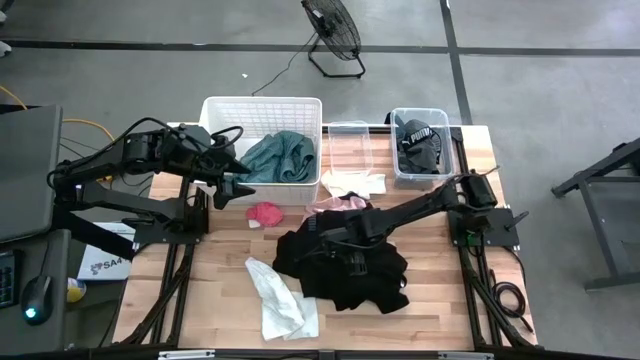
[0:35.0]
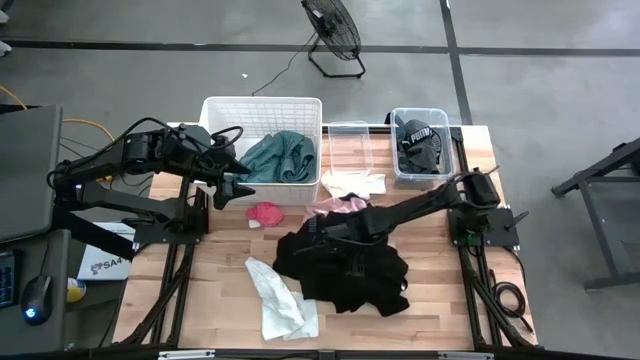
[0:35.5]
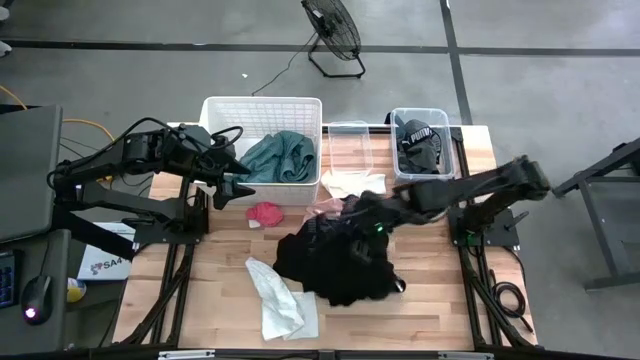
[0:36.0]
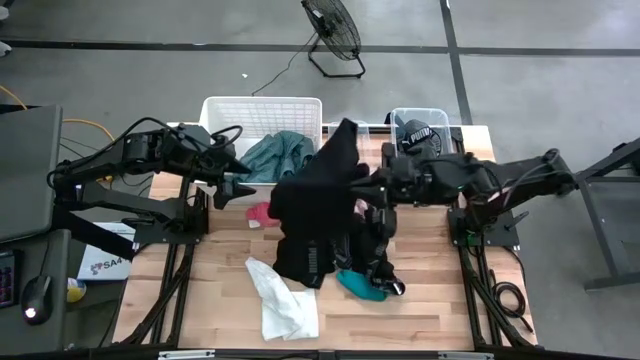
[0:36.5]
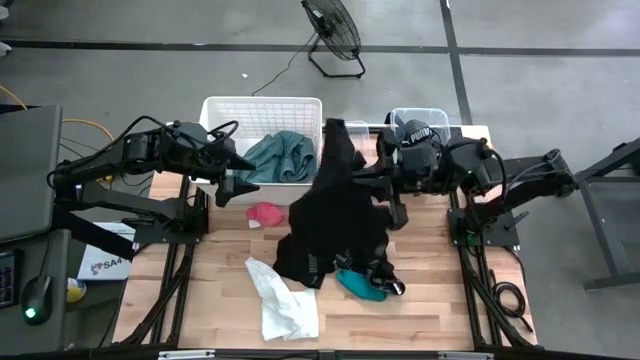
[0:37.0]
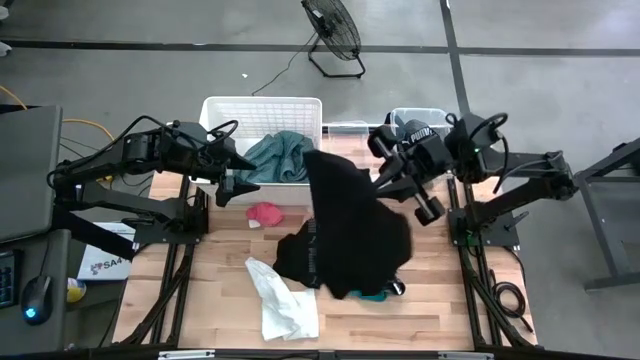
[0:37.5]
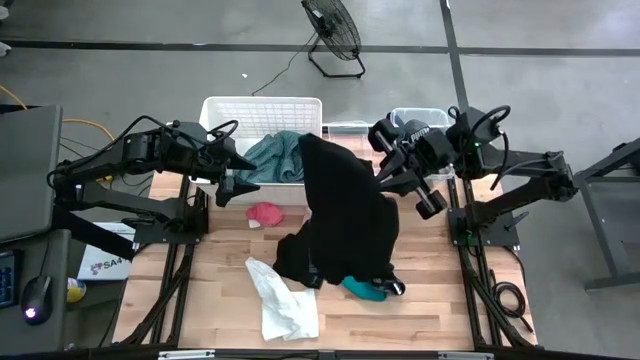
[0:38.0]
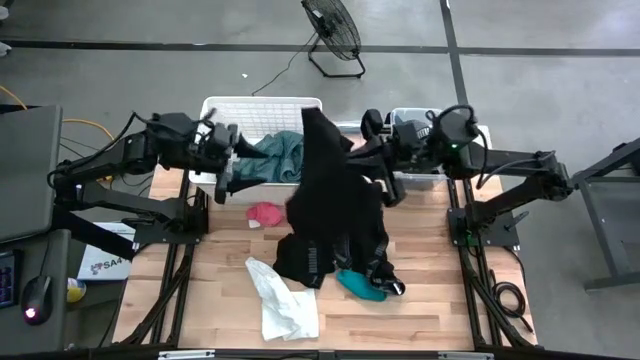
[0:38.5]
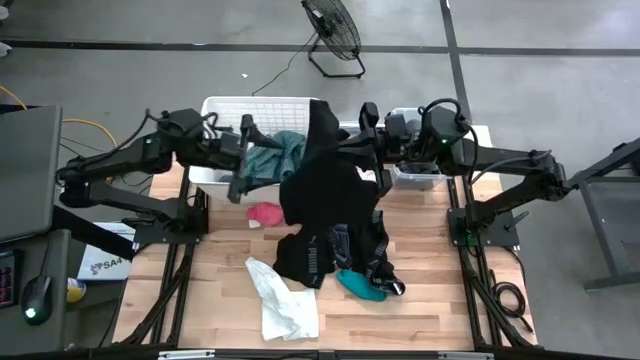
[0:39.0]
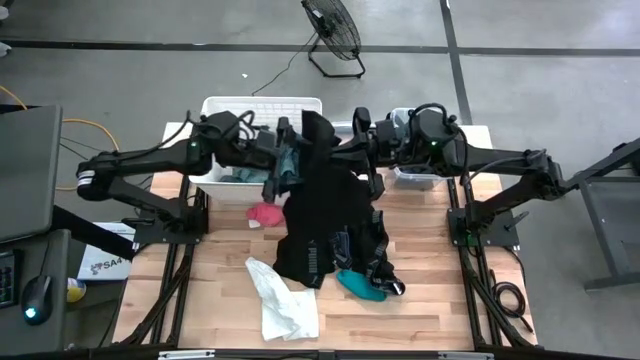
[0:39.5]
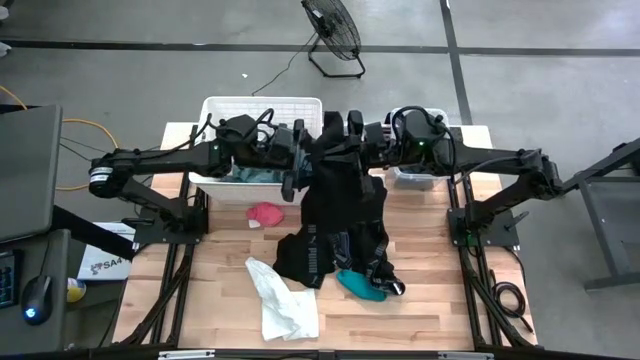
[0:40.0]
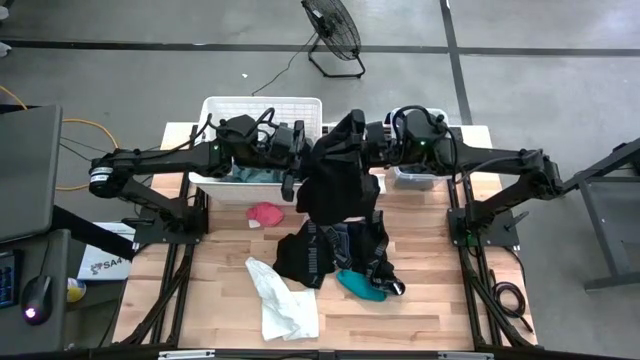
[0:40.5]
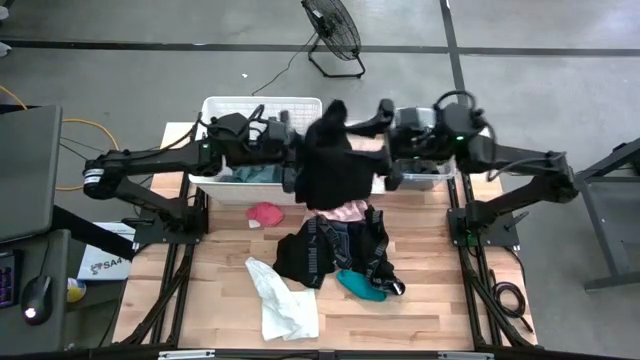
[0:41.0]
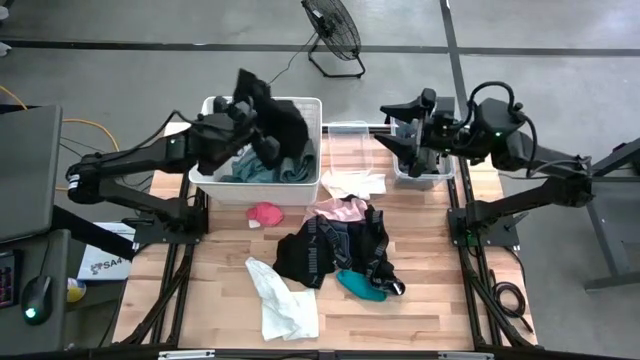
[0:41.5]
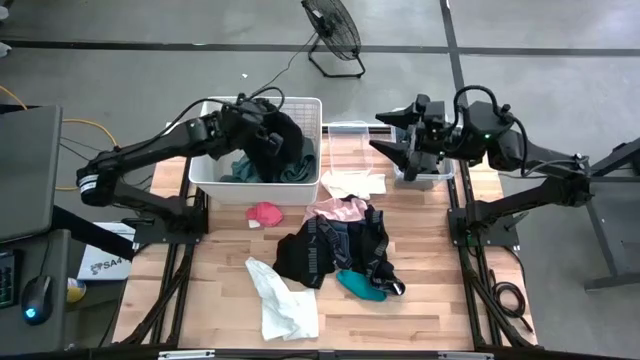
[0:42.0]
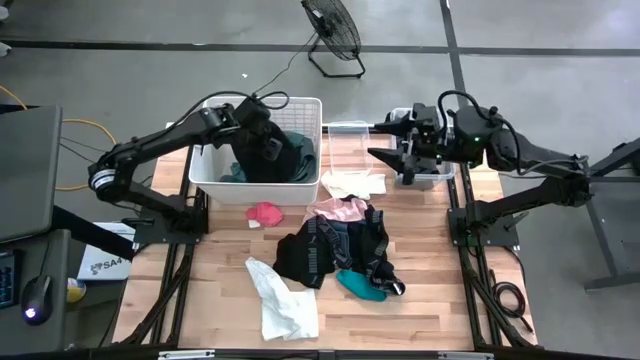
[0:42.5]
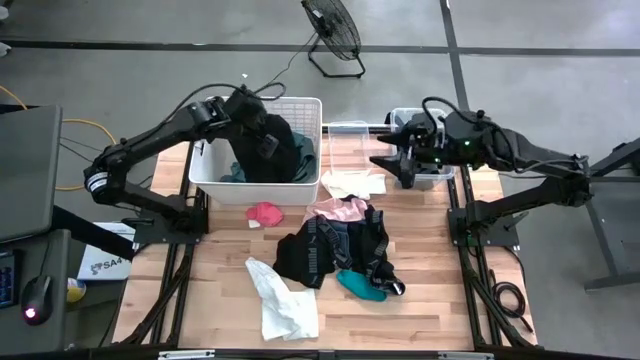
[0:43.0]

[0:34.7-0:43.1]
Task: Pick & Place Cloths
Put the black shirt into the white bin

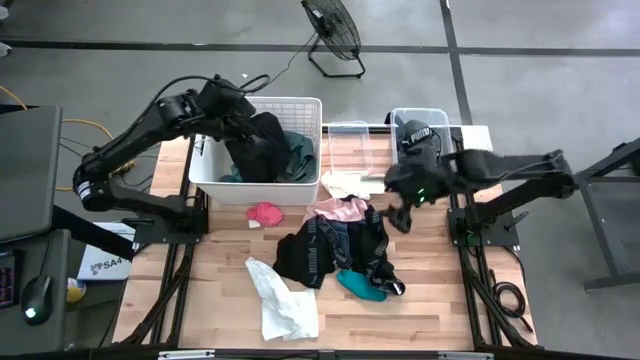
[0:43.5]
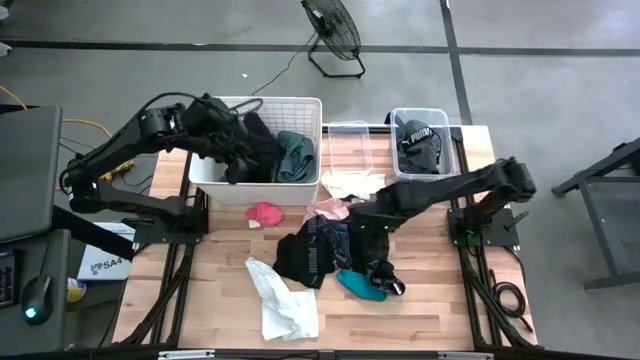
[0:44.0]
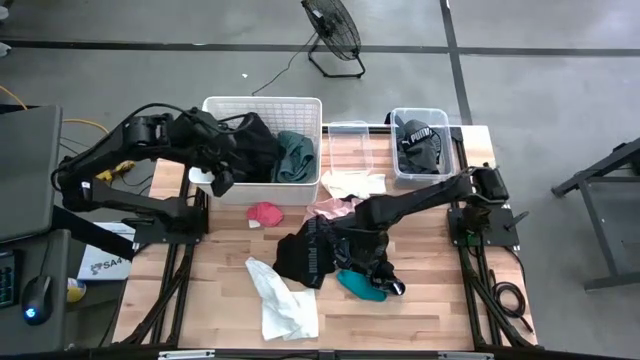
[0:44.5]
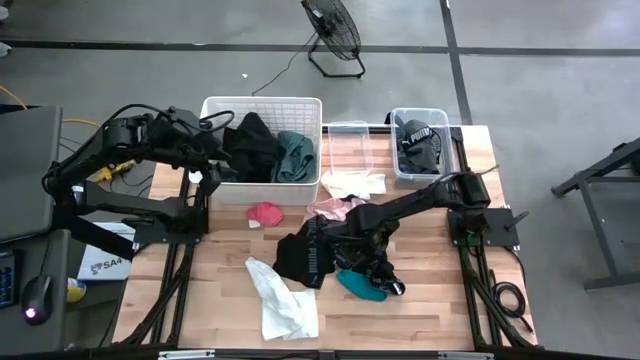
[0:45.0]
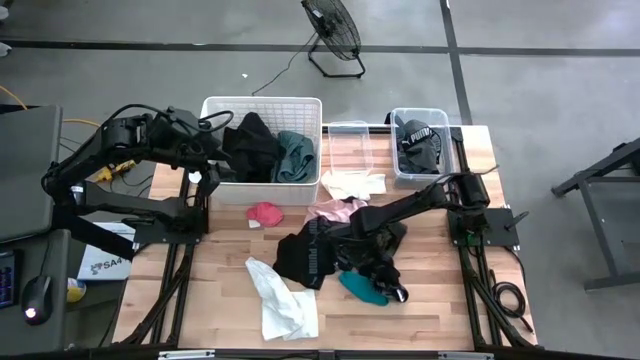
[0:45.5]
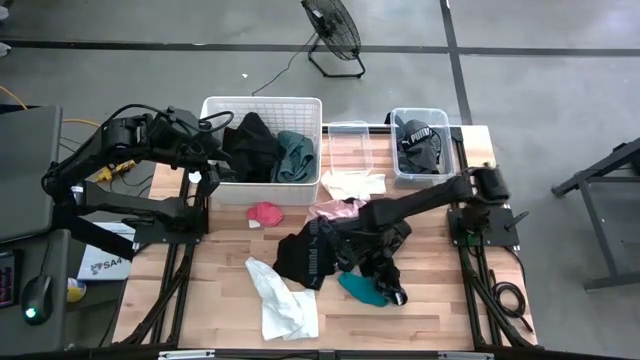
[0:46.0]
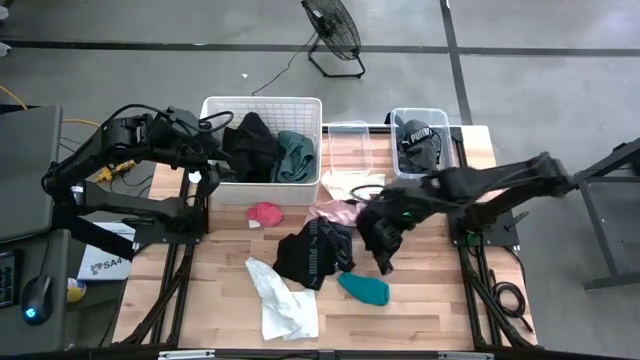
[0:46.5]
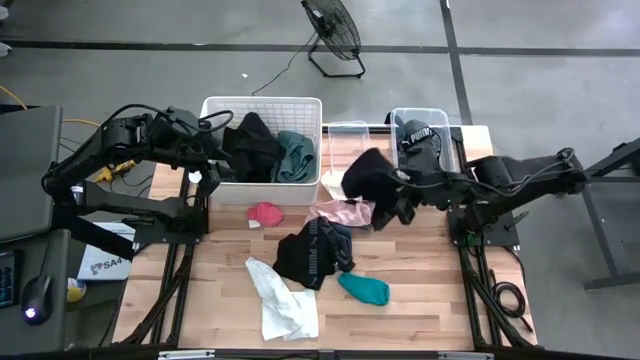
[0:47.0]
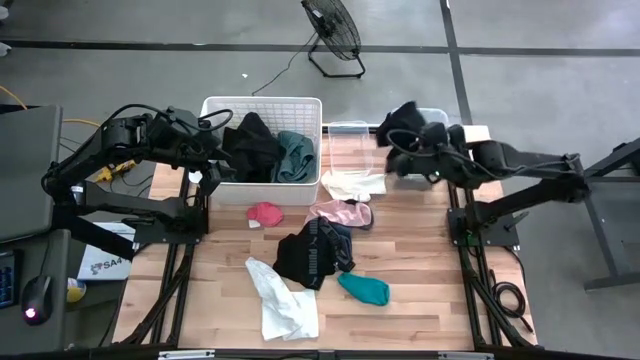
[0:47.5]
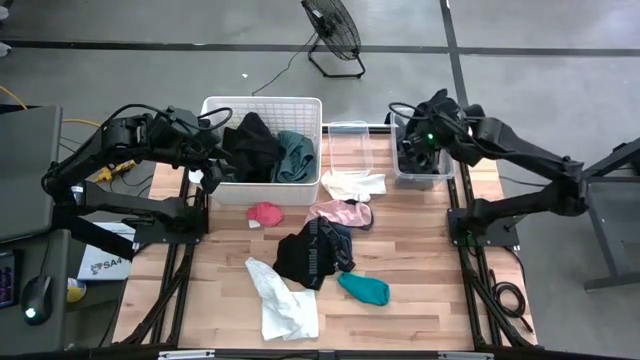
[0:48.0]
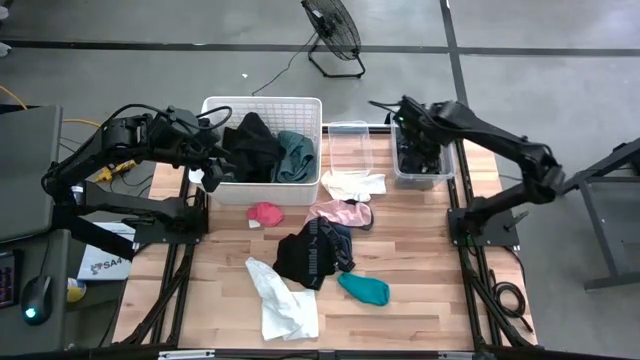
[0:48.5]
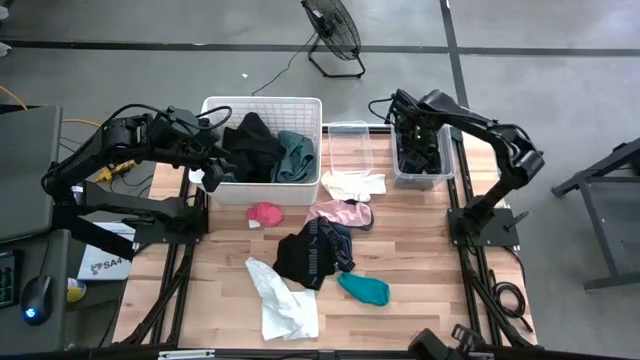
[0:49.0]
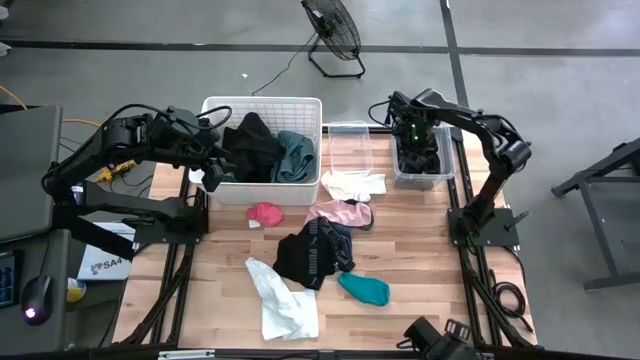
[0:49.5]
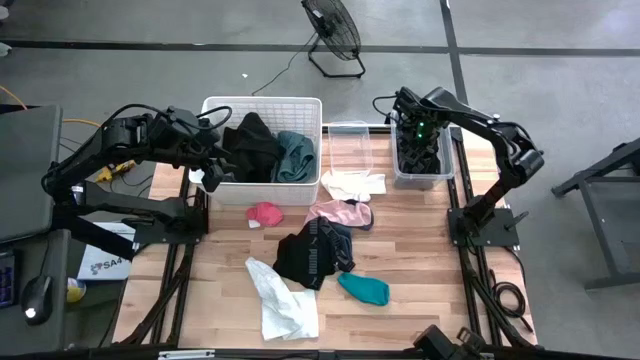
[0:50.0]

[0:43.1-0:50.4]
Put the right black boxer short into the right transparent bin

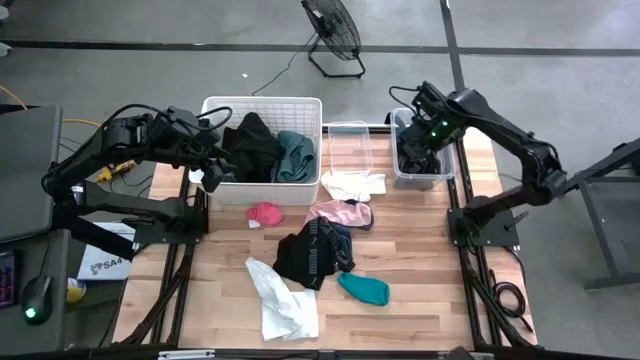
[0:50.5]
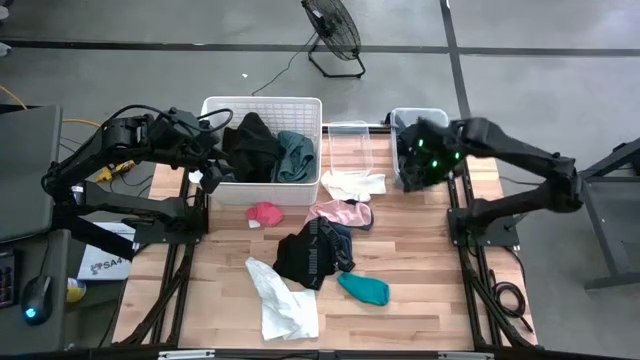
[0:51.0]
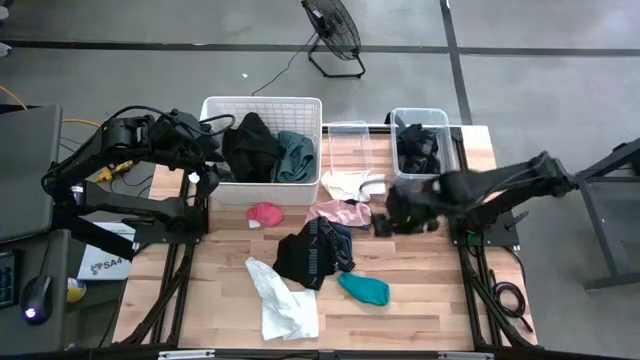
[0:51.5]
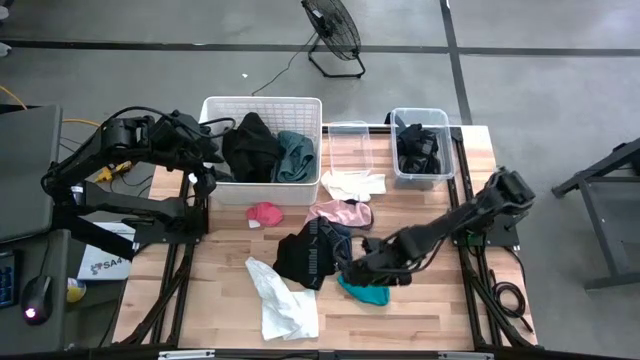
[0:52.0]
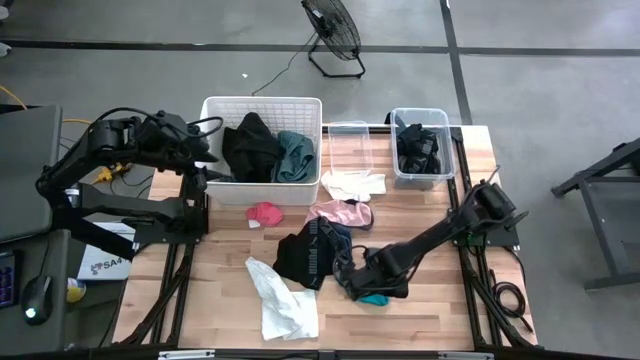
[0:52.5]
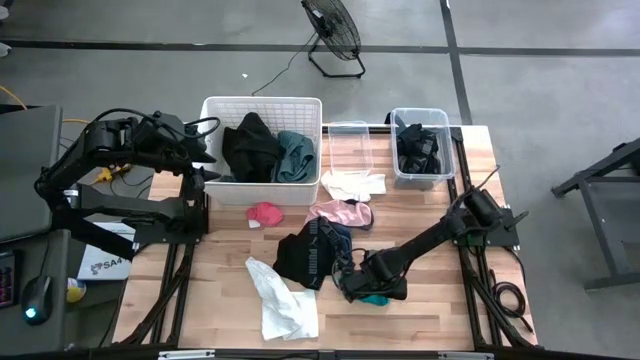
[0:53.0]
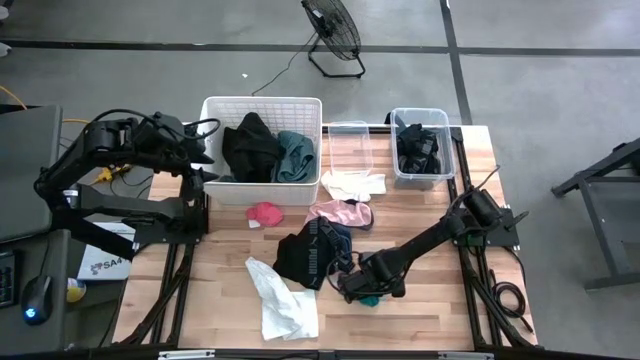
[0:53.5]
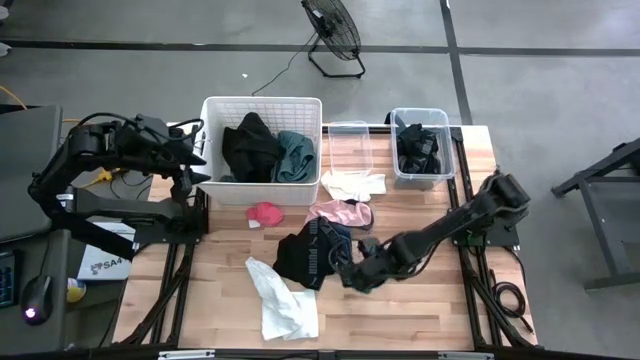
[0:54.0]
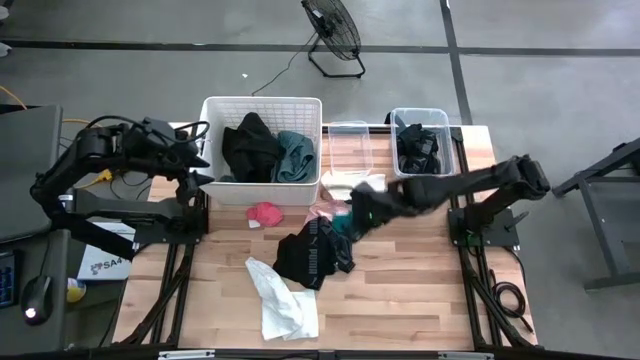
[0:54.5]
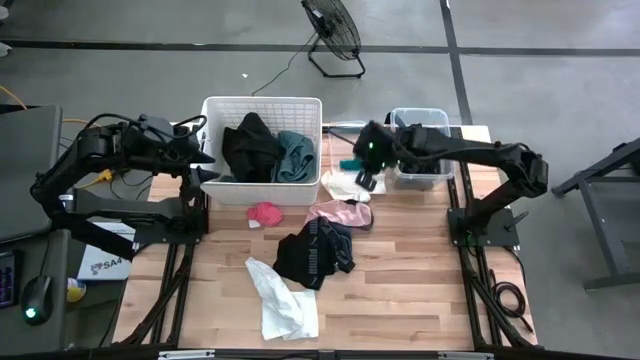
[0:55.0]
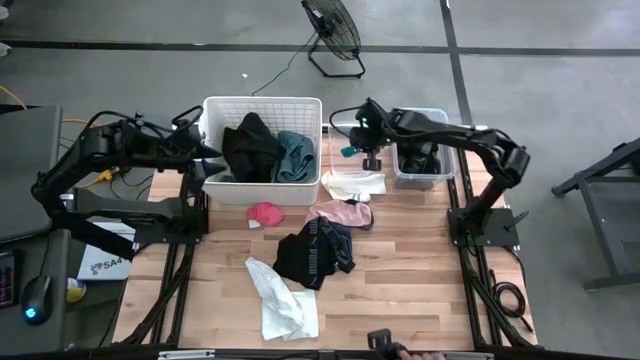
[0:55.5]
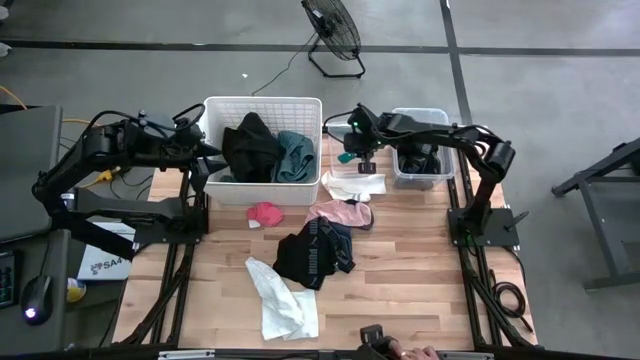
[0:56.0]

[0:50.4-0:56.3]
Put the blue sock into the left transparent bin
